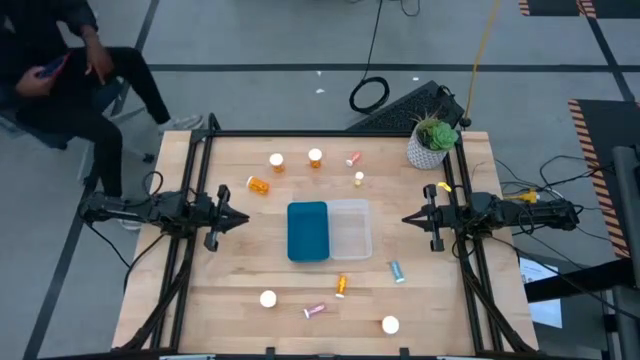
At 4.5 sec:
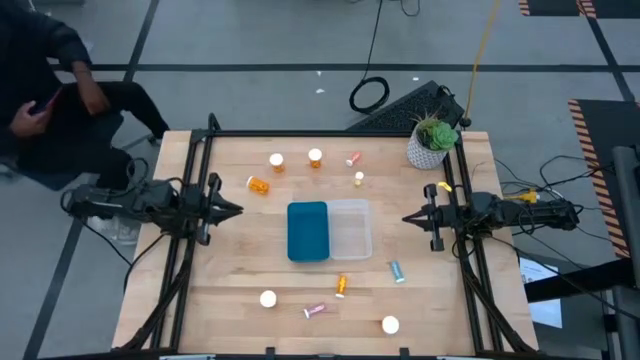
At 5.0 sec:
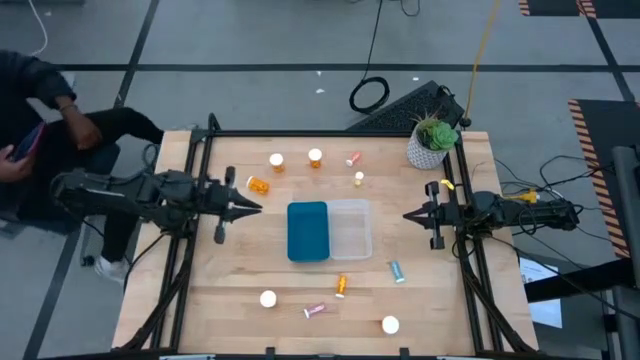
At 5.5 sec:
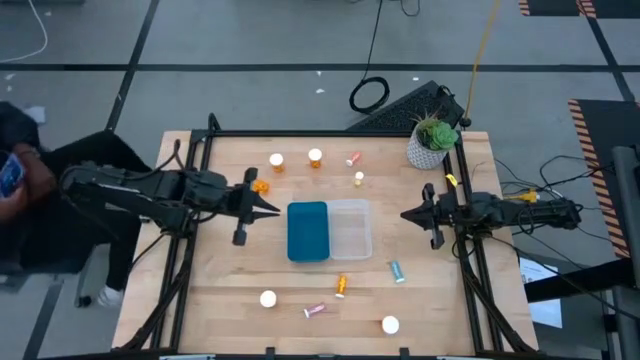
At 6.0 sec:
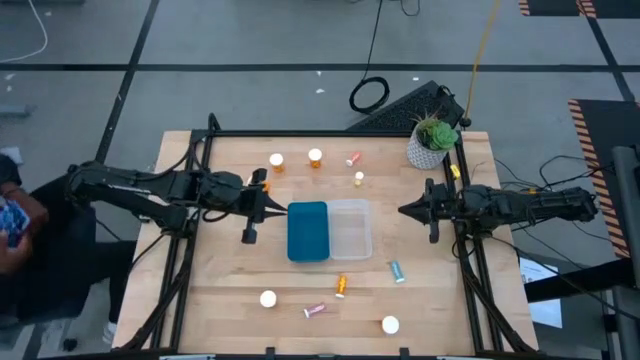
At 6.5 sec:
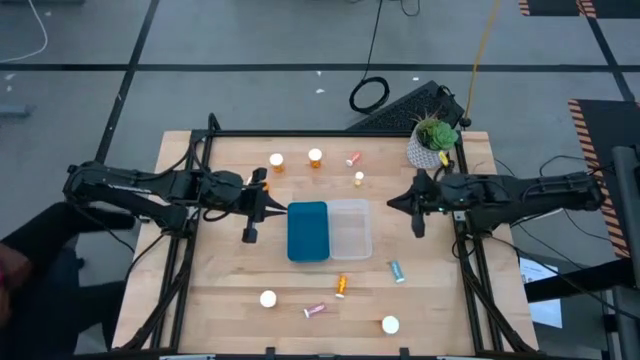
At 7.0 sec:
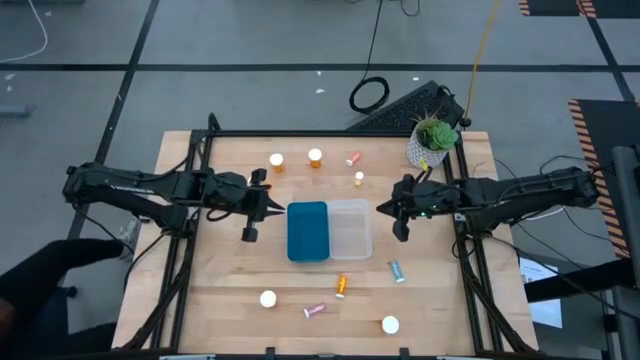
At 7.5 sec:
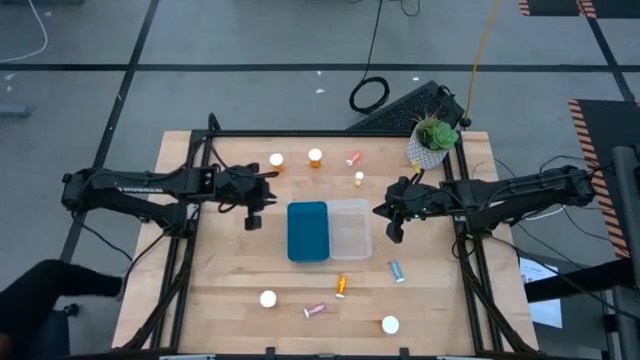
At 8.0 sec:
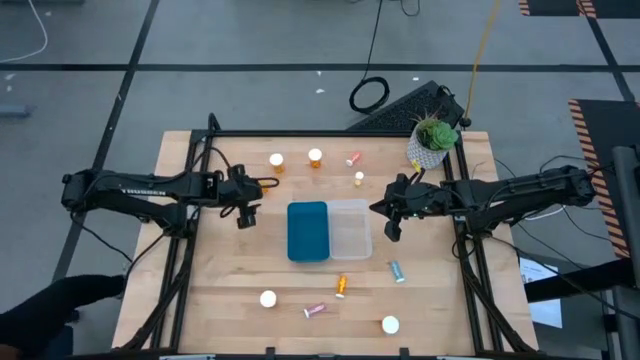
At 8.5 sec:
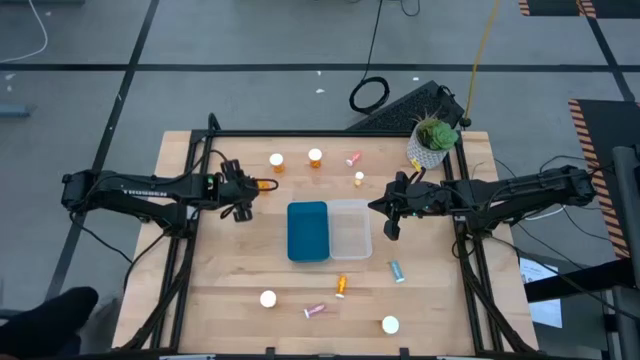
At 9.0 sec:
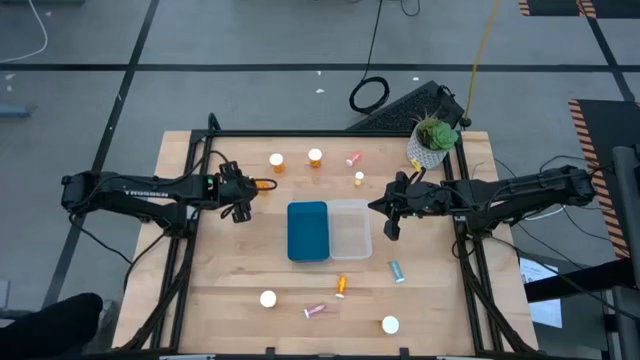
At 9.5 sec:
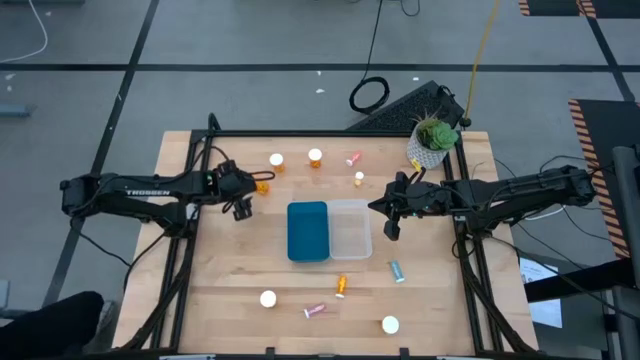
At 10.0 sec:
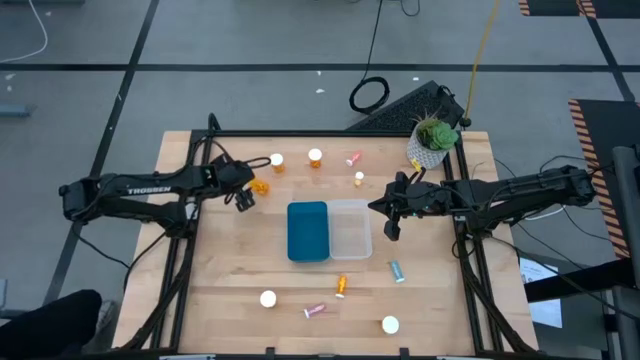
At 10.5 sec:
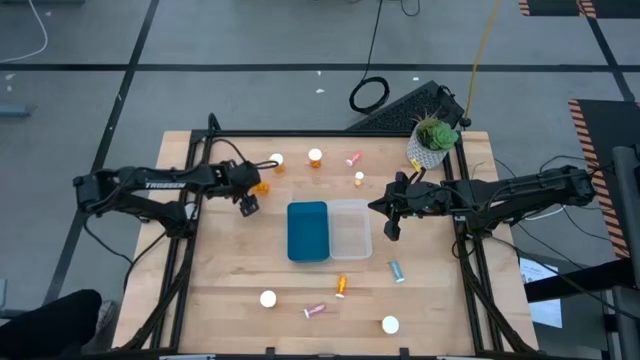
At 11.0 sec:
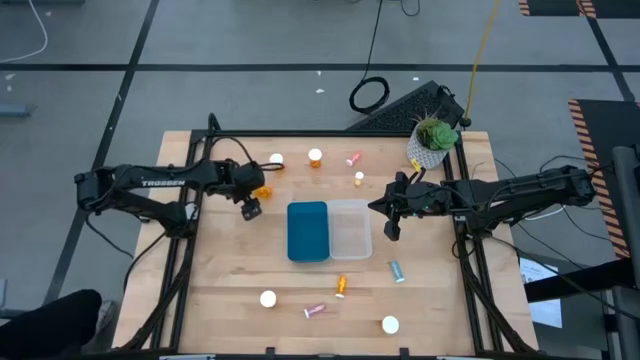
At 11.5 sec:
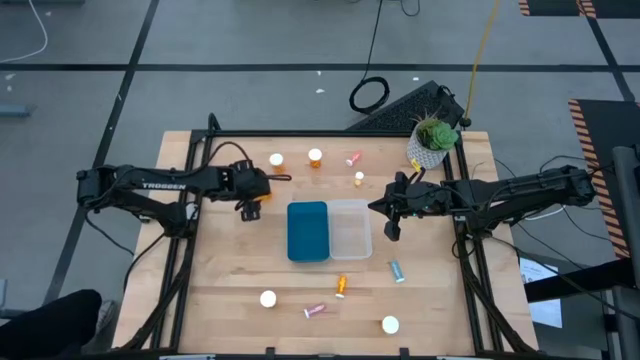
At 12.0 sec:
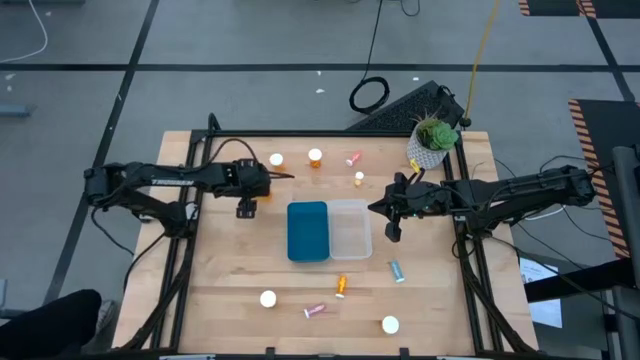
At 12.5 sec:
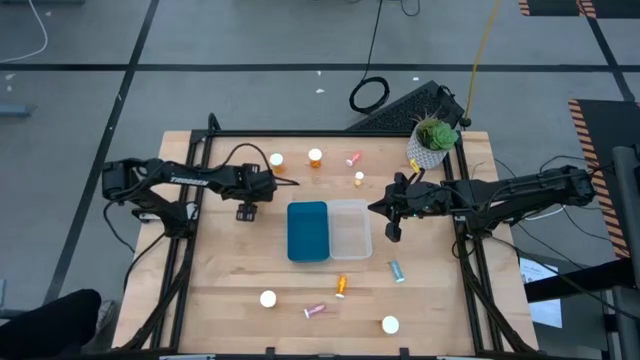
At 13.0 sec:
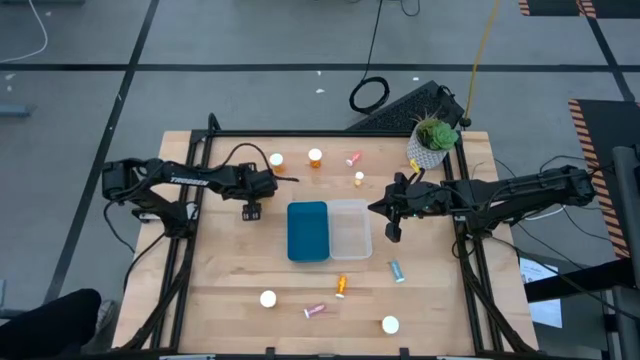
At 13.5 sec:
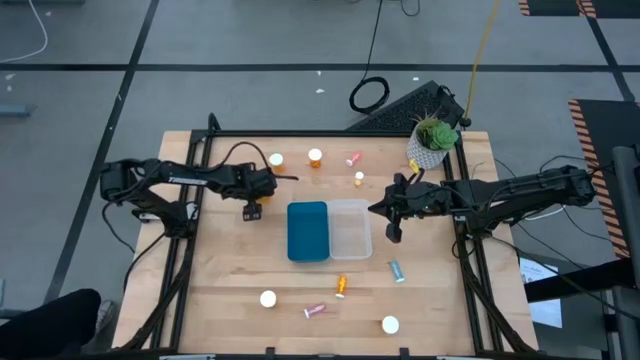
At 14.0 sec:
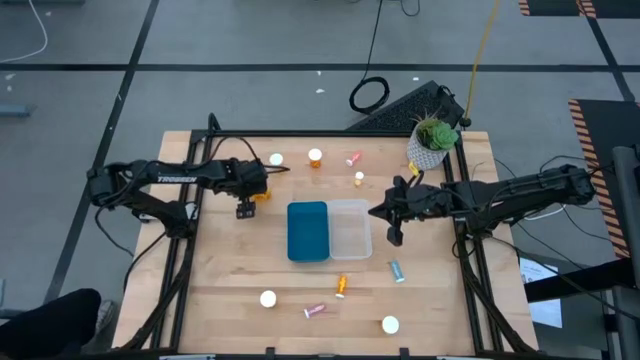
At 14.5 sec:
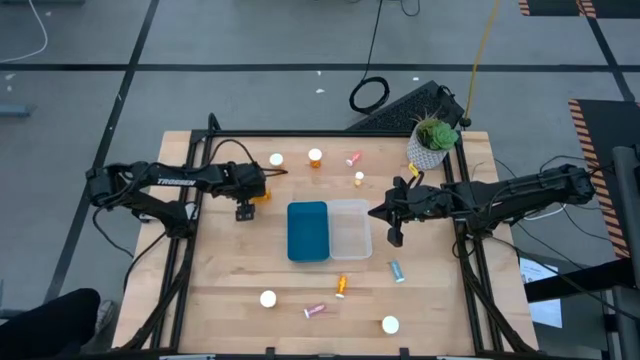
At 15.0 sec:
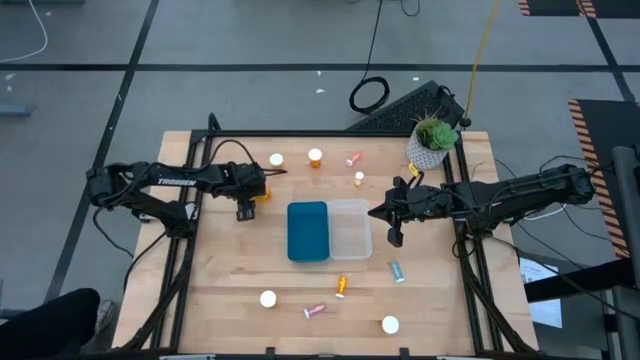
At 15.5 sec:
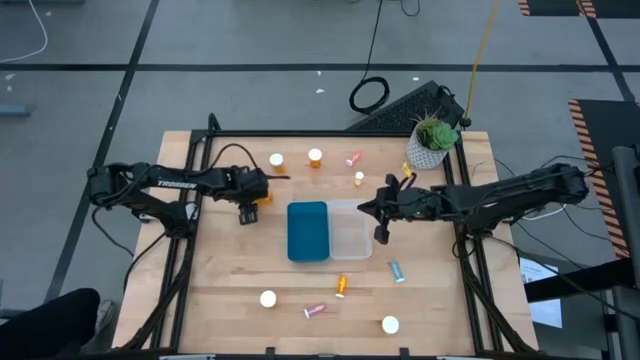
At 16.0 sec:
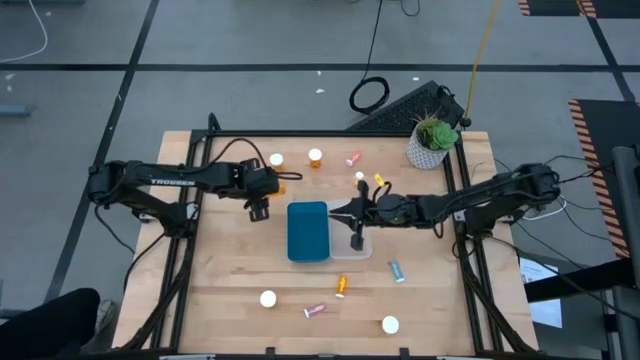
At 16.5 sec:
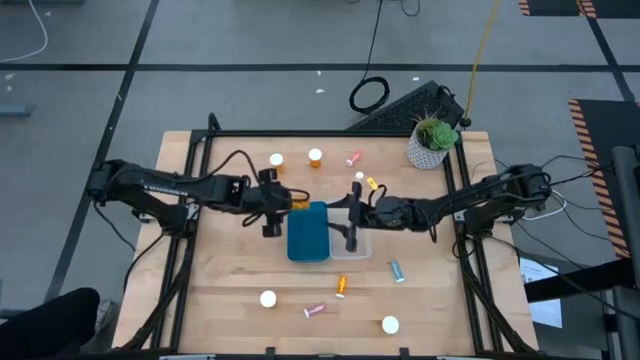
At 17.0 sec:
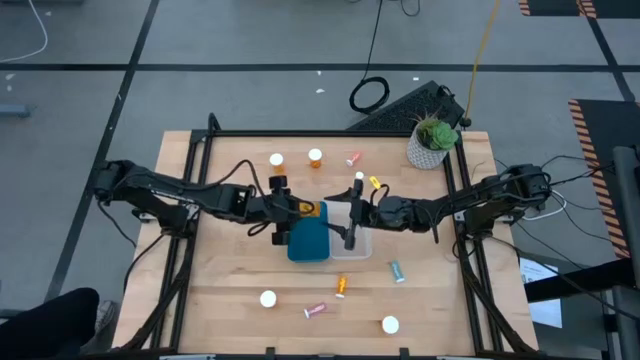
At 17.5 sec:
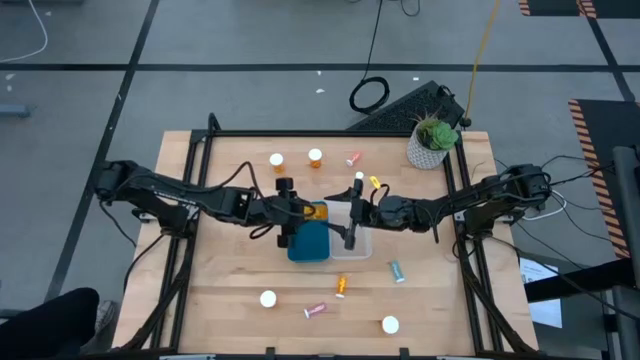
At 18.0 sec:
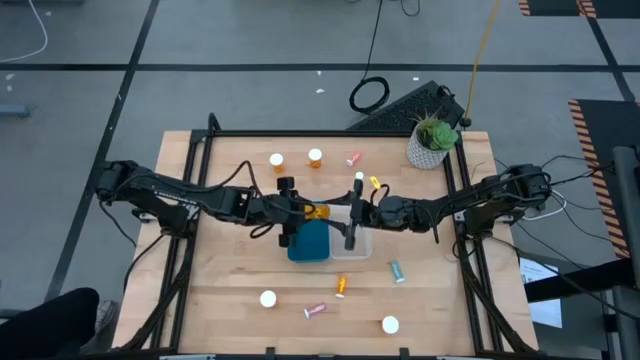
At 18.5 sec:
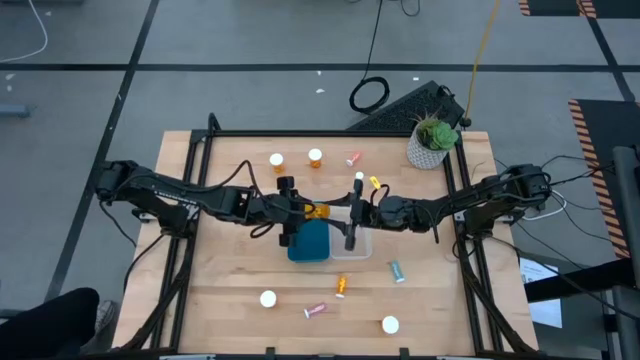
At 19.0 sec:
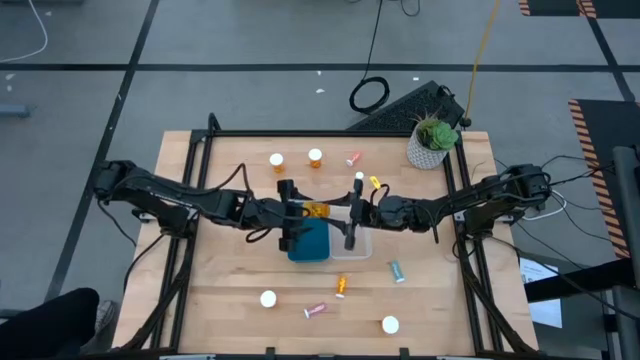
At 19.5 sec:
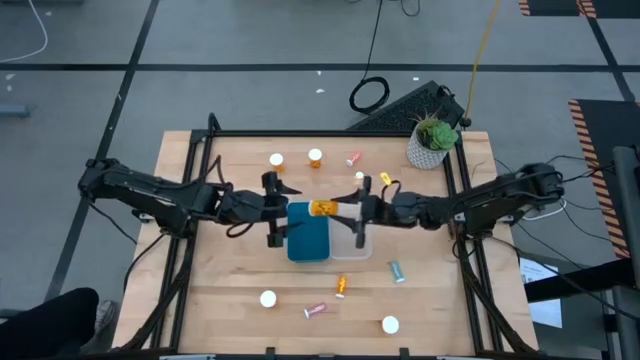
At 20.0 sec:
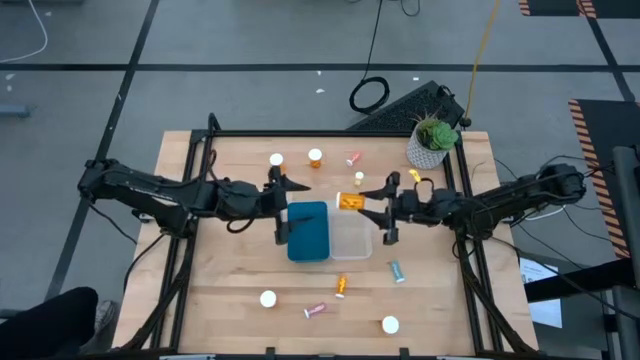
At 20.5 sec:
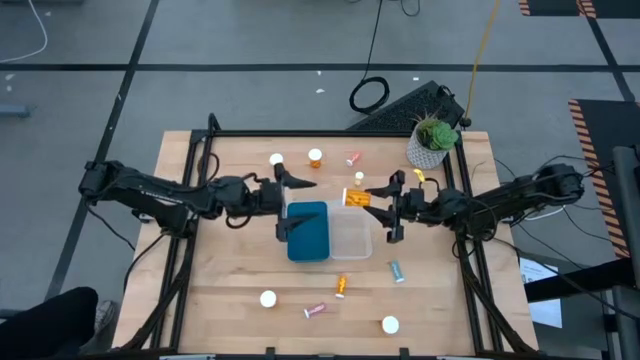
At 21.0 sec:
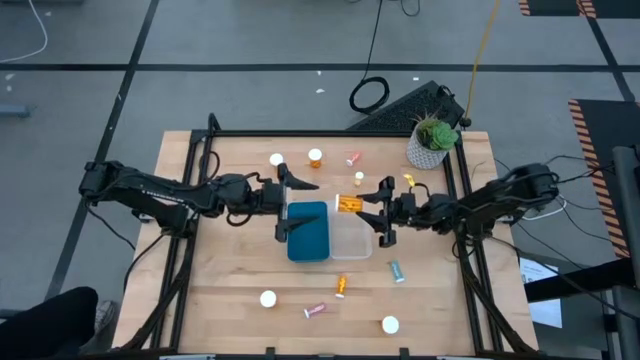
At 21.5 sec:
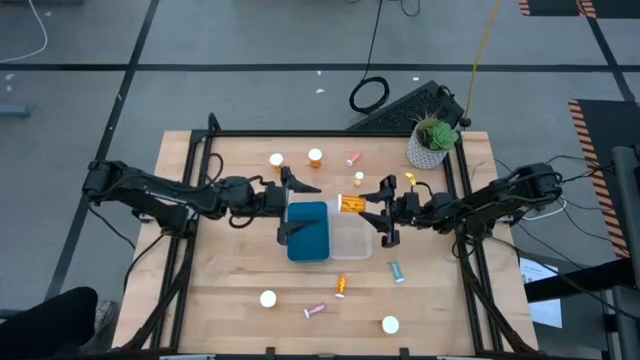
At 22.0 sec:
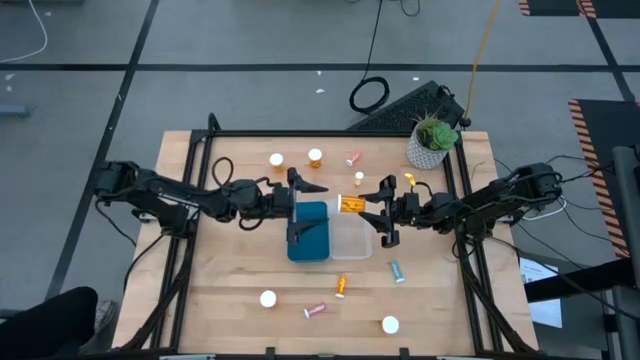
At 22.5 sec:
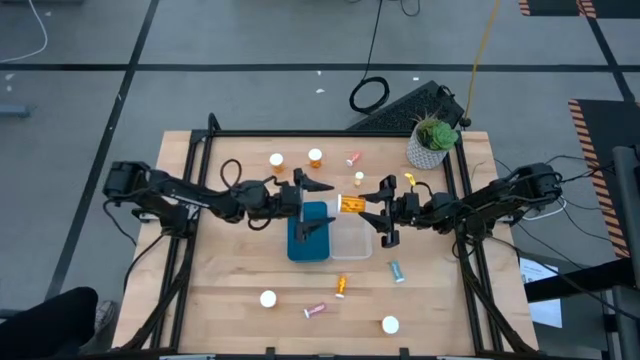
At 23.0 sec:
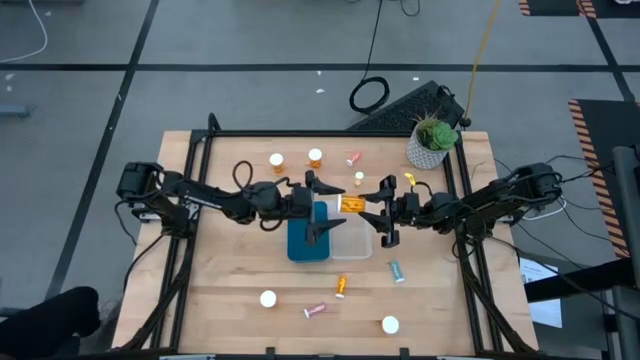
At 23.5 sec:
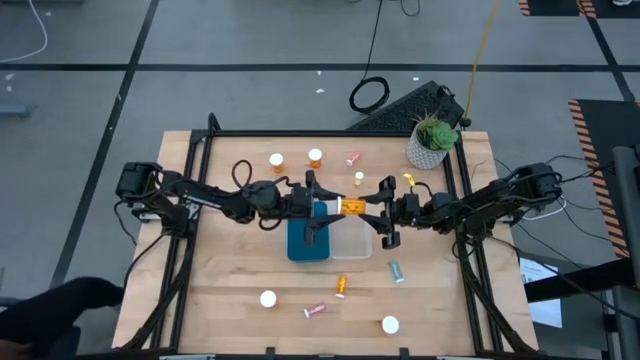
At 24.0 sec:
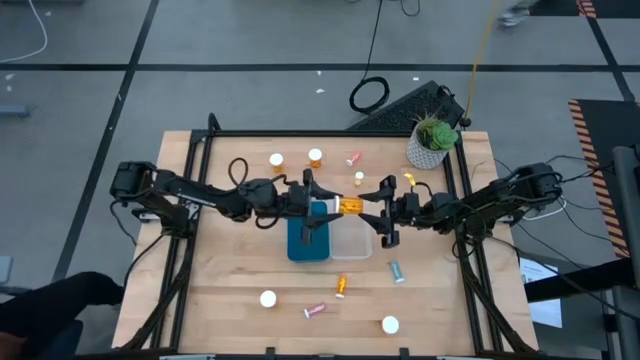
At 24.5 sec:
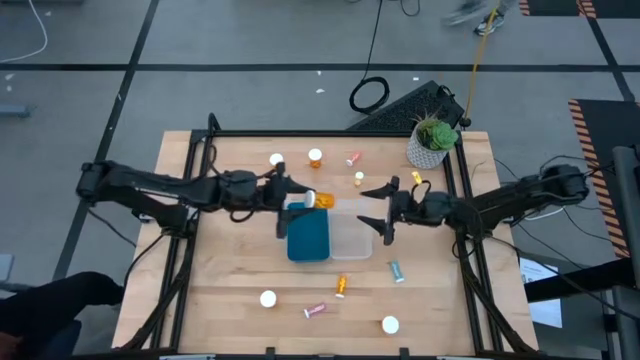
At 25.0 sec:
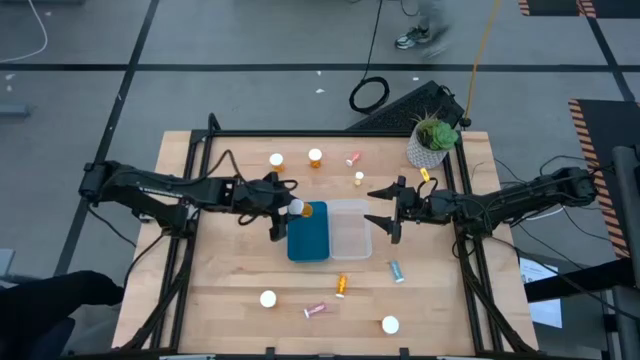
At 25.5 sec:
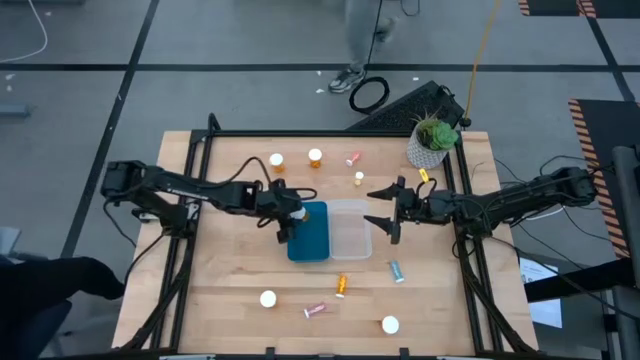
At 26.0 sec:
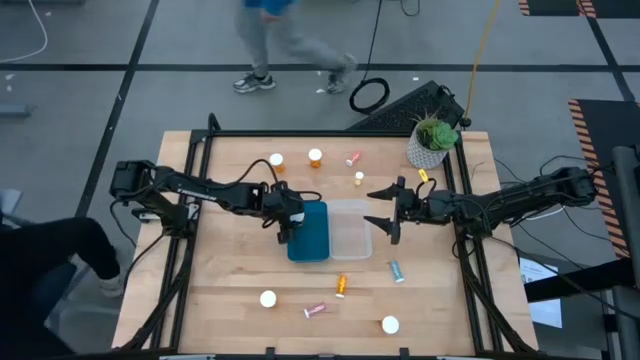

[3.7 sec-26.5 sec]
Task: Pick and place medicine bottles into bin by pill shape (circle, oval)
Put the large orange pill bottle into the blue transparent bin
